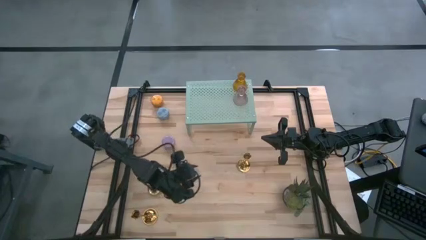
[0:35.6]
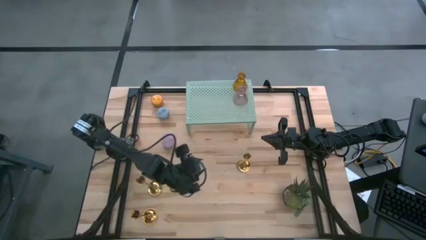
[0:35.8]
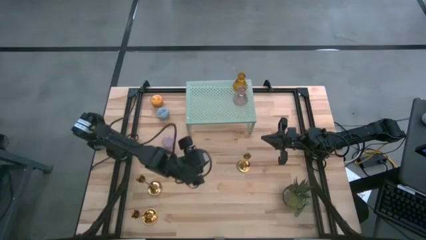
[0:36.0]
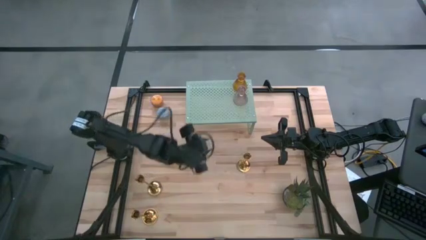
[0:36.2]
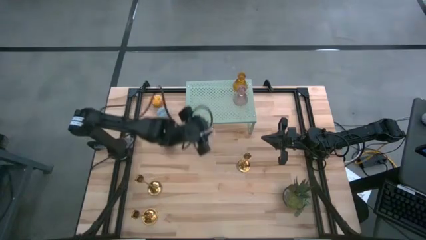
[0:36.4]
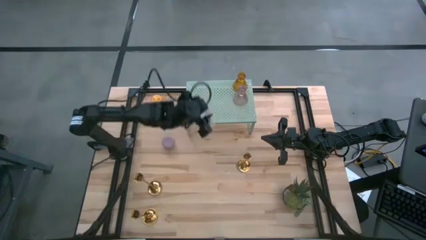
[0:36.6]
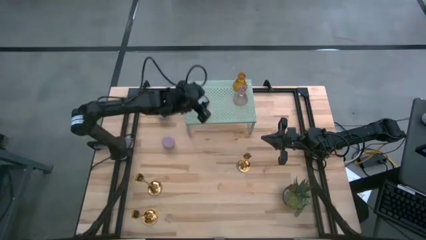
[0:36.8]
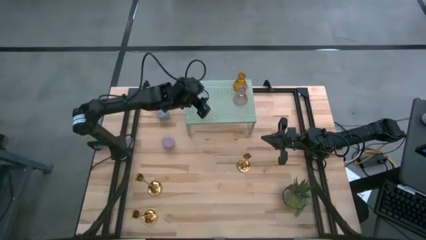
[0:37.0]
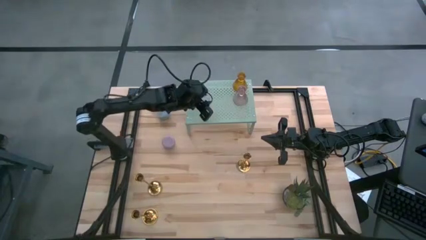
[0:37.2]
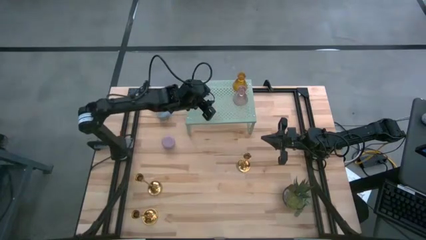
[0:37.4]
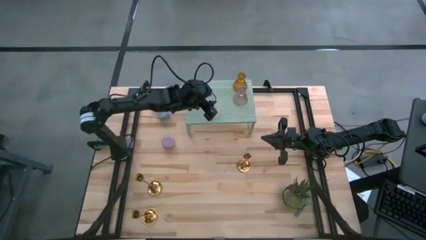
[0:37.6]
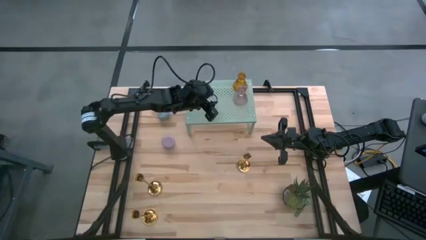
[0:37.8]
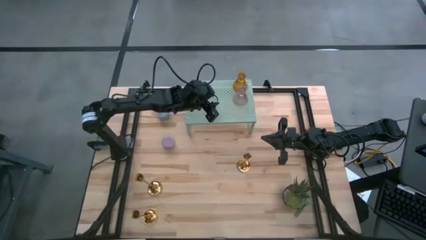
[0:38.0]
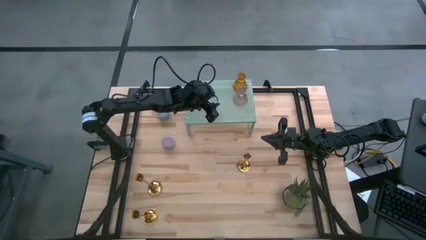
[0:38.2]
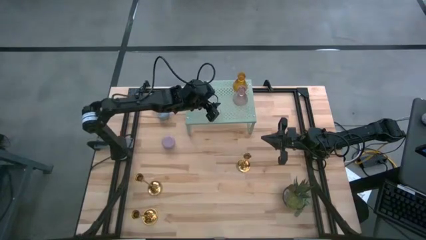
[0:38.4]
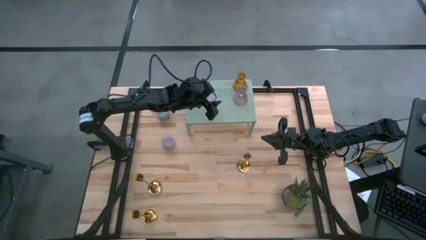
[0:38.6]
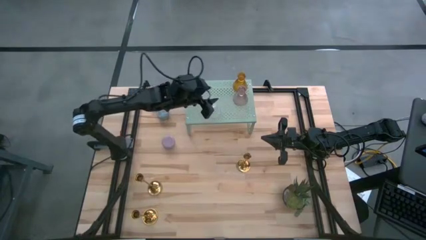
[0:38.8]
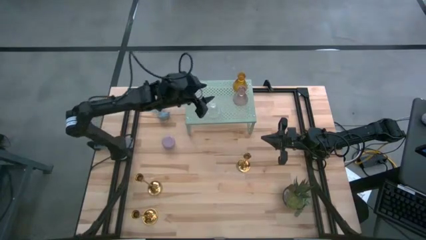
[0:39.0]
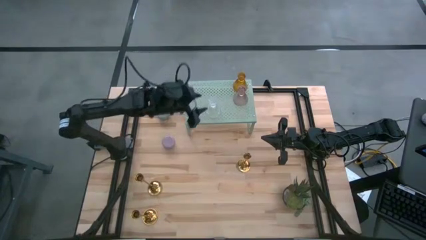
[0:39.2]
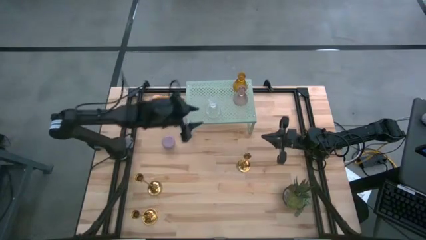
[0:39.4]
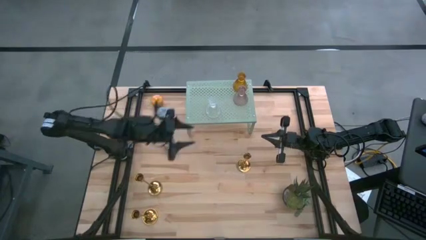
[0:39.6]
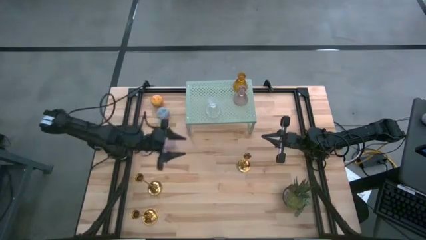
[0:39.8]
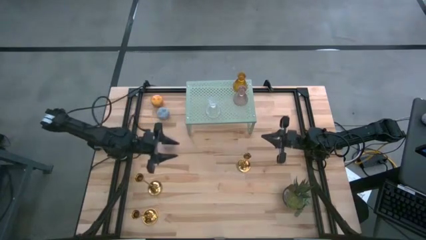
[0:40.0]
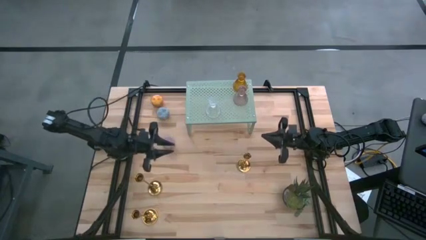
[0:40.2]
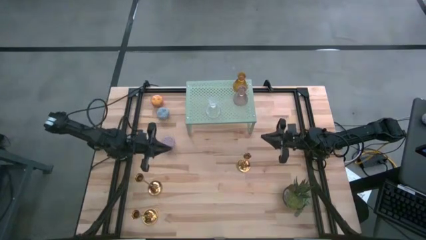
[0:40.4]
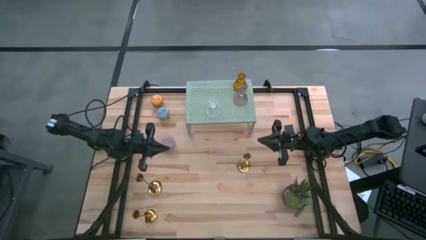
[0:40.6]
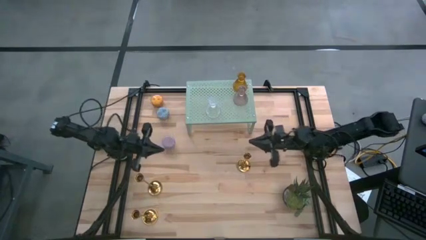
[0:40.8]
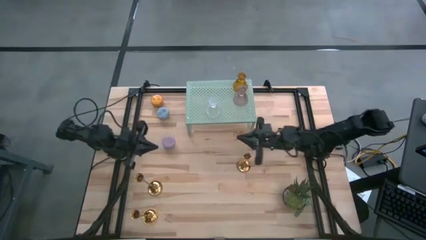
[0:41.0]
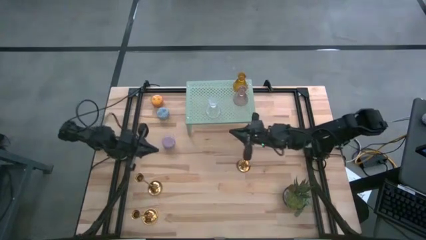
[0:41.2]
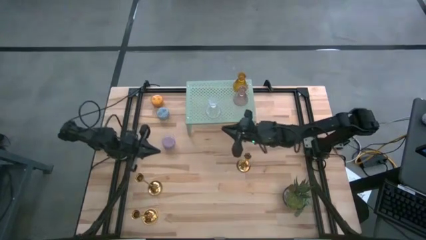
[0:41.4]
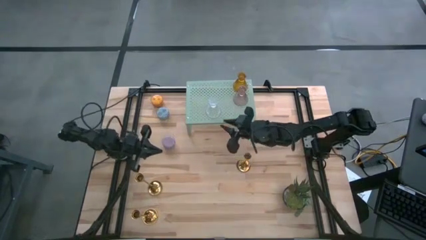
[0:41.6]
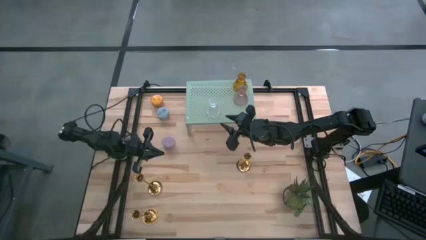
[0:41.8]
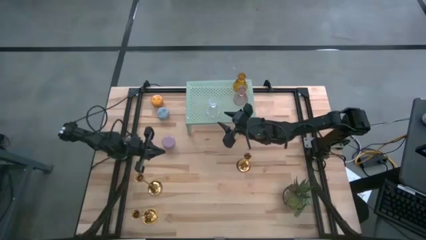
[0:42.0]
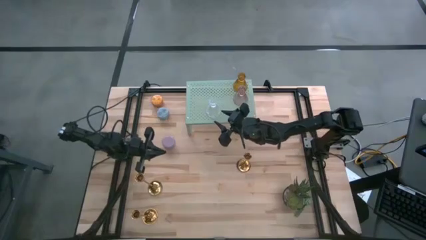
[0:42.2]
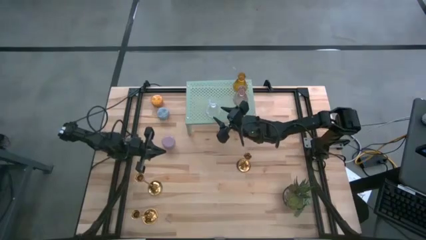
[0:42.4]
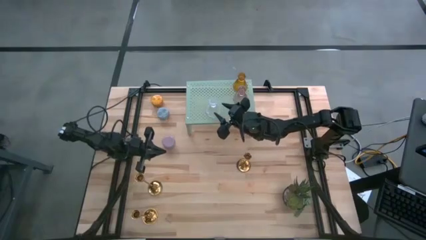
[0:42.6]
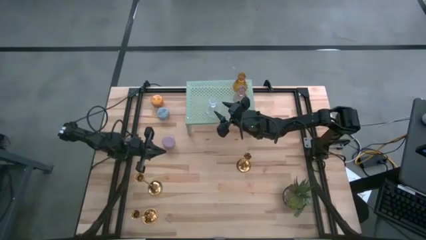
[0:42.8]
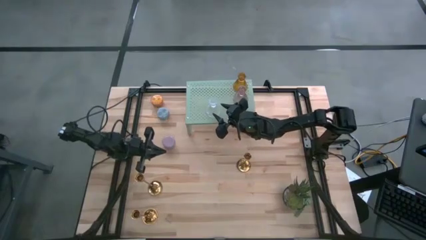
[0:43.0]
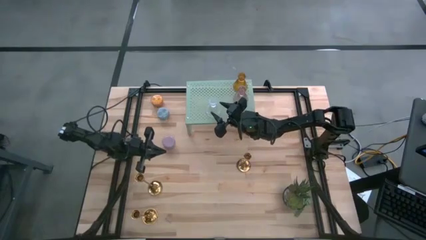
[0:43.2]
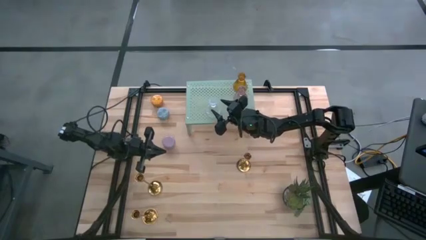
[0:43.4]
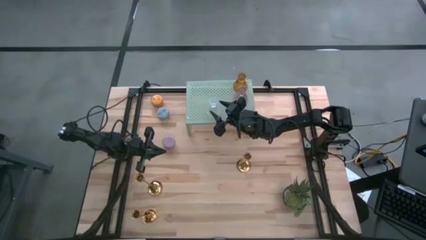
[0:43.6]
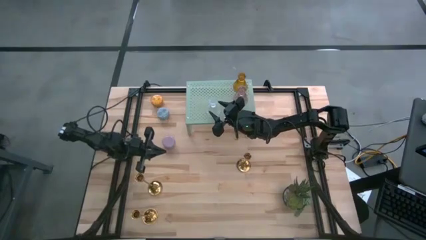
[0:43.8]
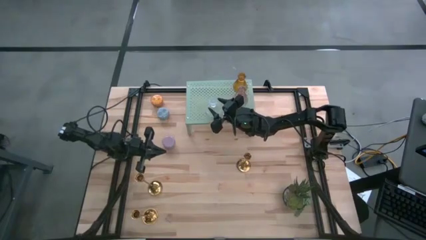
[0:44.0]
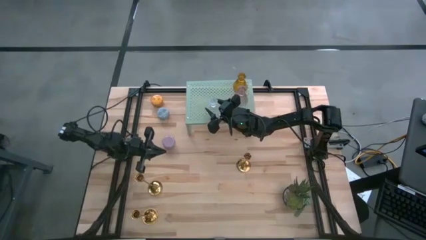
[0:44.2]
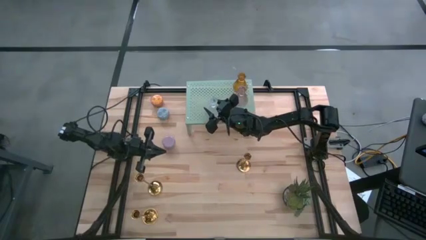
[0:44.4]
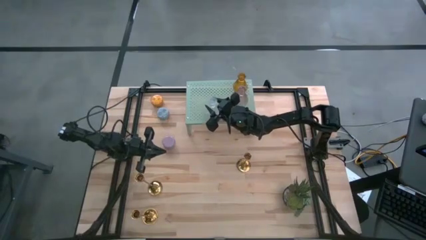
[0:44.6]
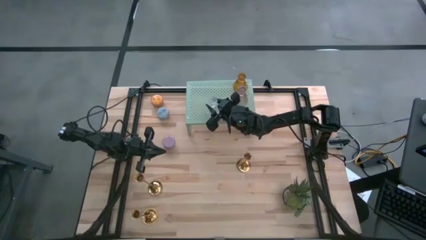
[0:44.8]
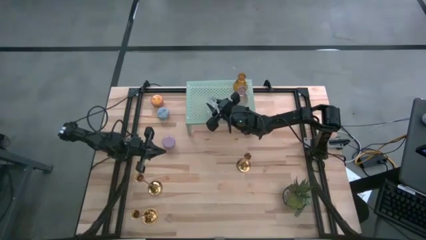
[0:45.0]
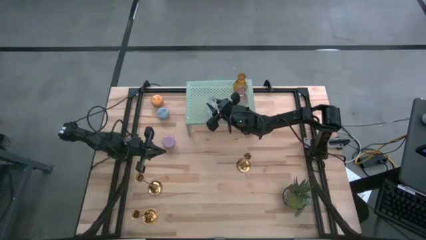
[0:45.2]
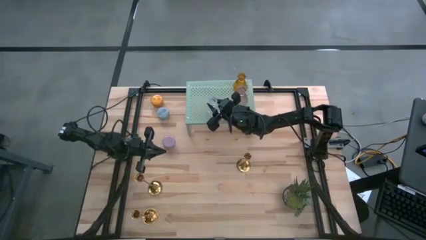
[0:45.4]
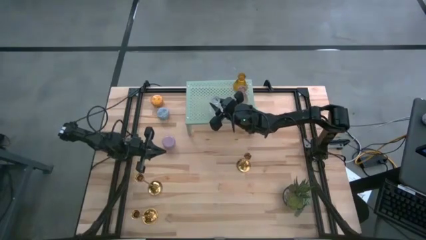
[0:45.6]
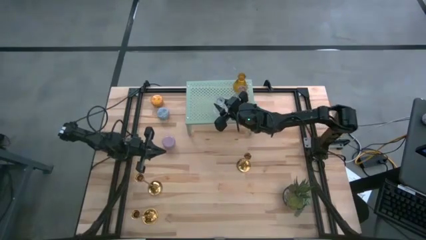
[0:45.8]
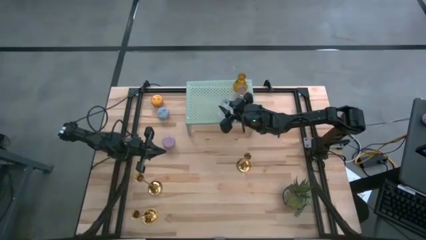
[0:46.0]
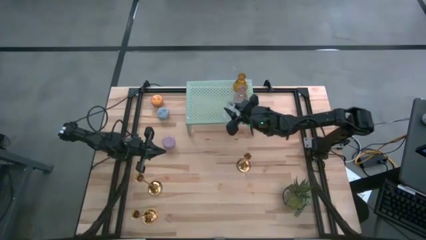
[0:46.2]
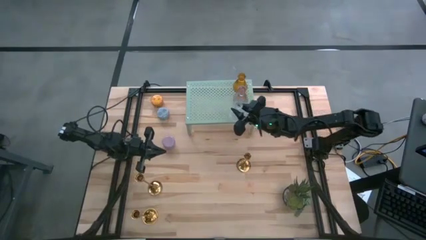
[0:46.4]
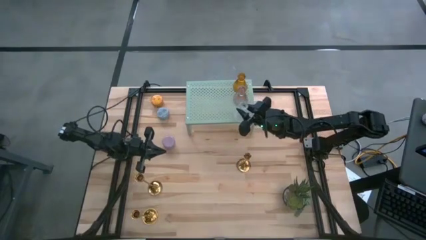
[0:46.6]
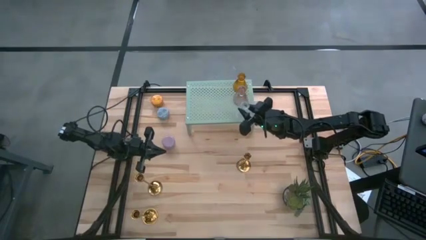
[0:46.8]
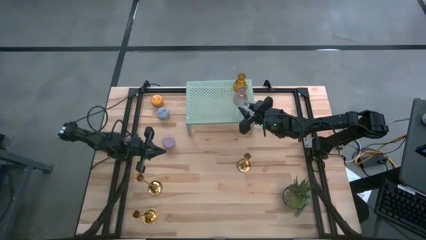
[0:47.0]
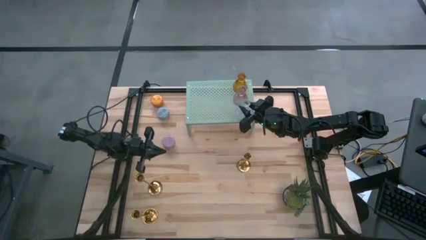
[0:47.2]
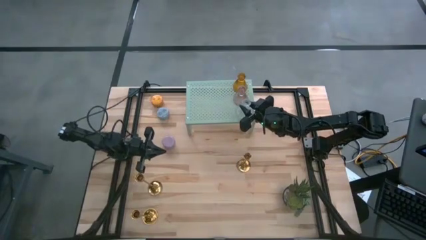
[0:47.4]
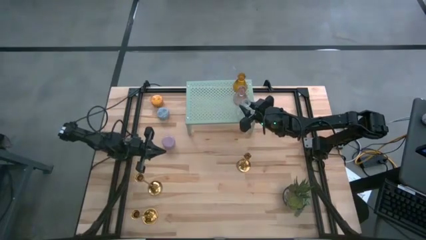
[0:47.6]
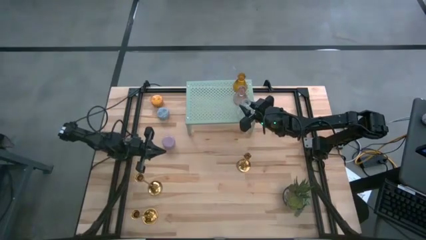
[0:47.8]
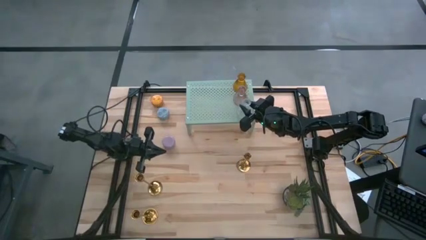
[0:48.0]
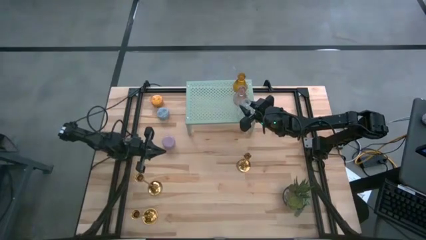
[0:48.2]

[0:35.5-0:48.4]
Task: Pick & Place candle stick holders
Put the transparent candle holder on the shelf

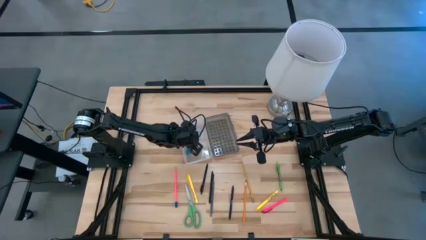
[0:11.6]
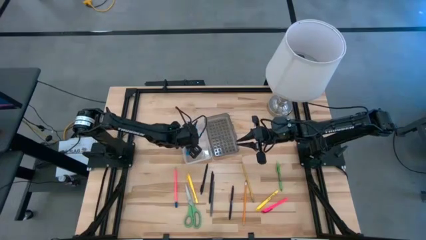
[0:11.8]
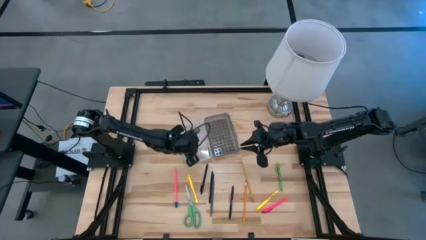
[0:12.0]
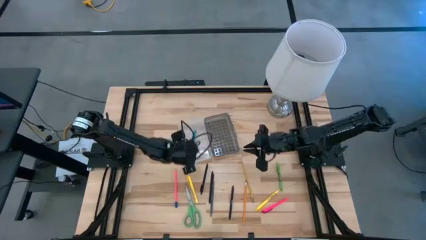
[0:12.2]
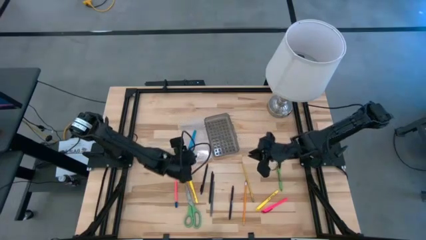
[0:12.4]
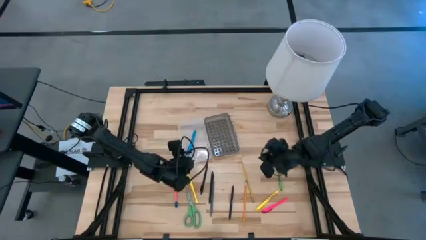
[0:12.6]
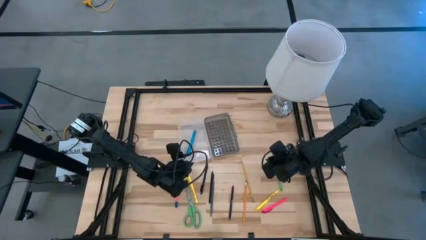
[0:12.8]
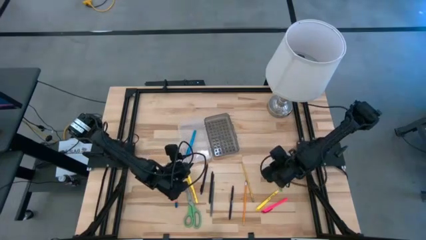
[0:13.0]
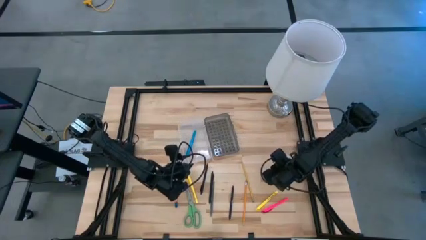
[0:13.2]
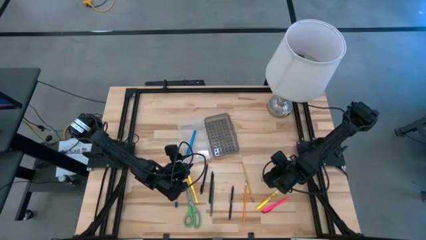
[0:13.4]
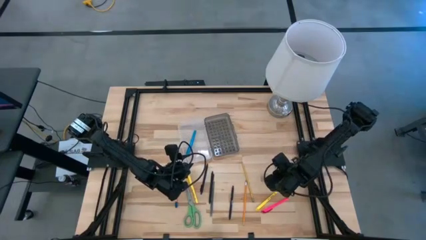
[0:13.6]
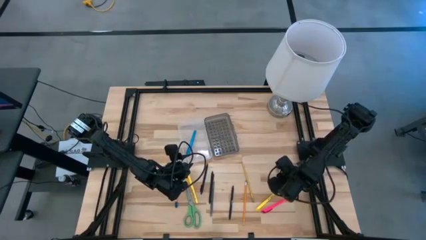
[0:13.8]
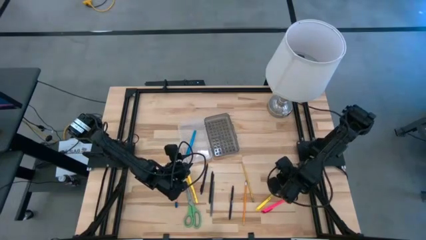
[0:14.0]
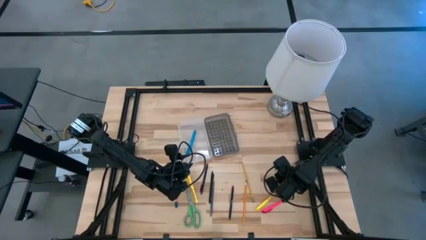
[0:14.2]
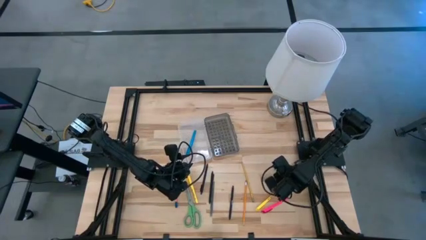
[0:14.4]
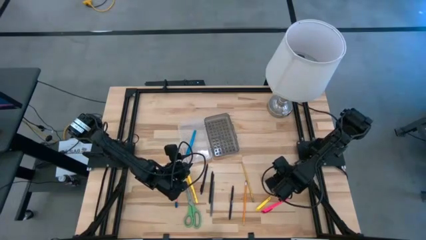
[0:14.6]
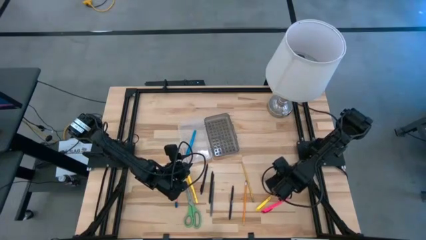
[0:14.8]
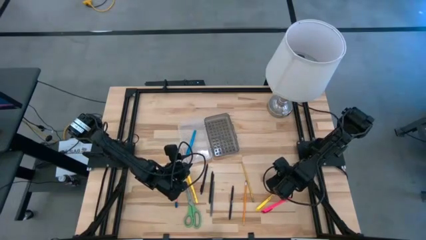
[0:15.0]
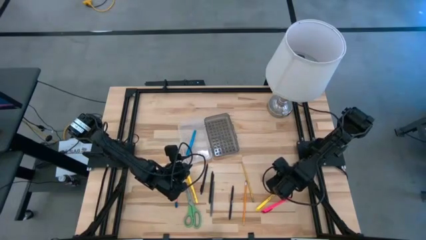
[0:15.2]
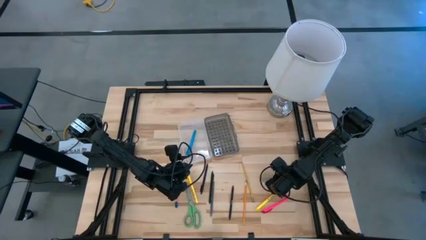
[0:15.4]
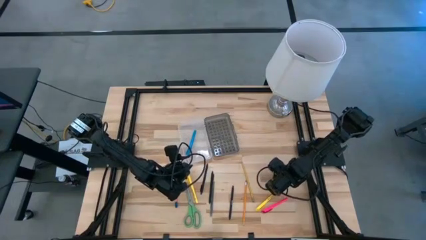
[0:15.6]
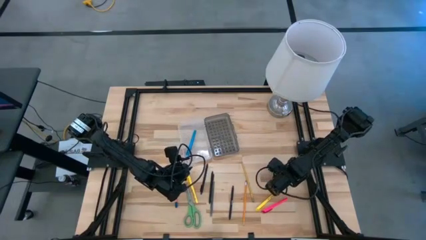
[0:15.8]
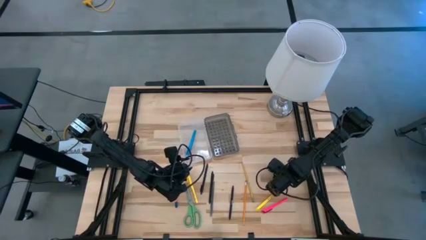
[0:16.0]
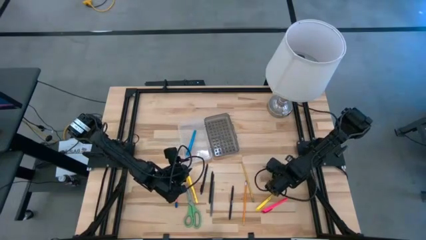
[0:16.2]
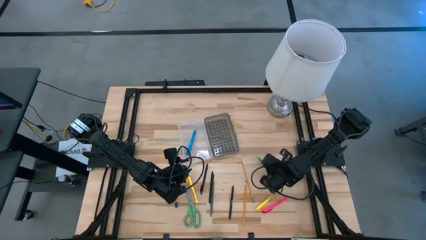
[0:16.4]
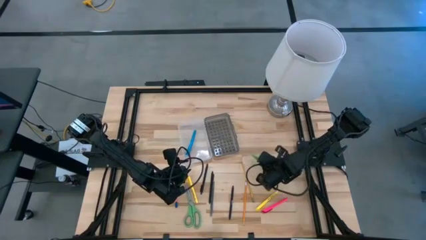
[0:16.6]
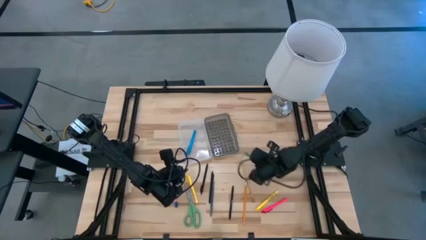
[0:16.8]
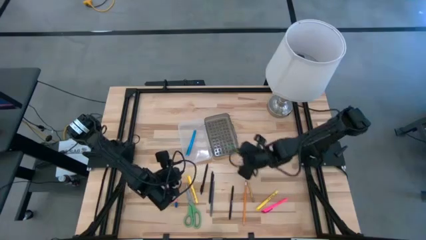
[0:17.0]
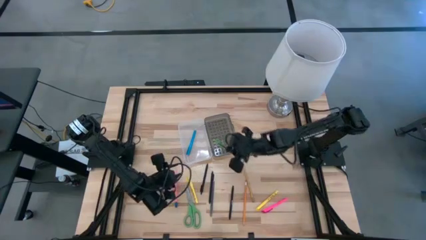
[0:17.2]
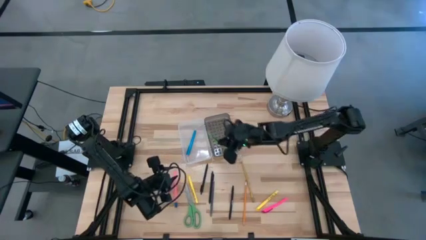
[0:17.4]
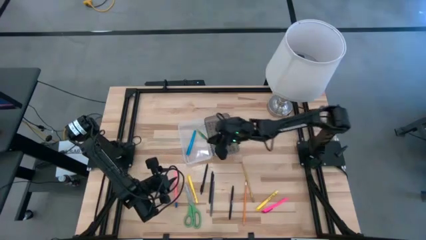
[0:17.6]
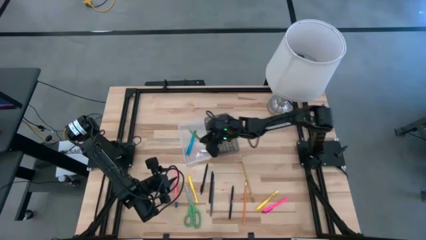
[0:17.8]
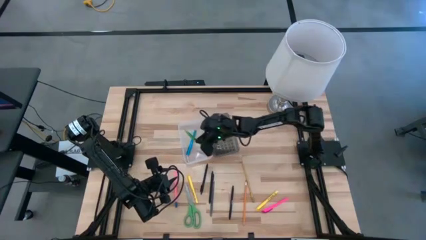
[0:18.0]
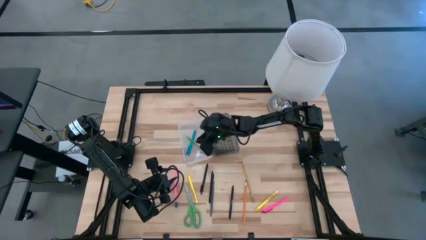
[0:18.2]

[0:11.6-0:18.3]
Task: Pick & place school supplies into a supply box
Put the green pen into the black supply box
